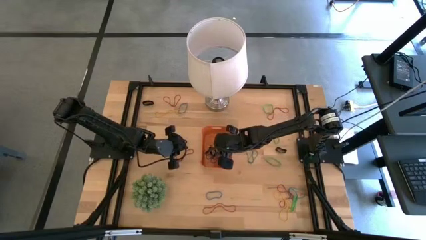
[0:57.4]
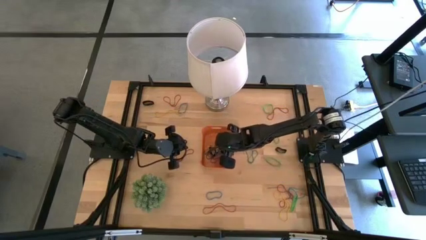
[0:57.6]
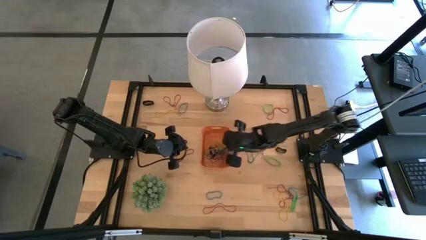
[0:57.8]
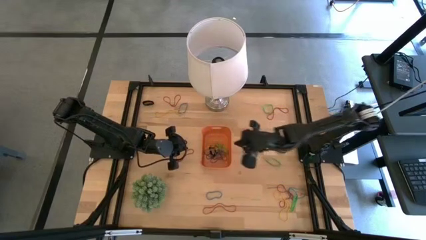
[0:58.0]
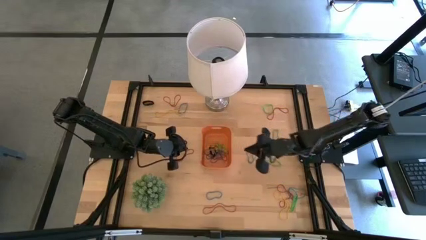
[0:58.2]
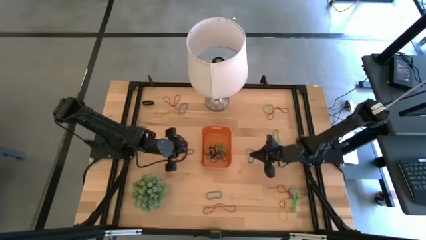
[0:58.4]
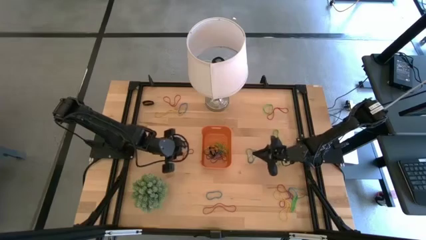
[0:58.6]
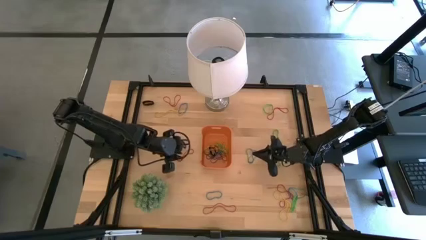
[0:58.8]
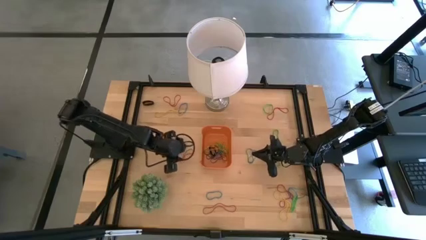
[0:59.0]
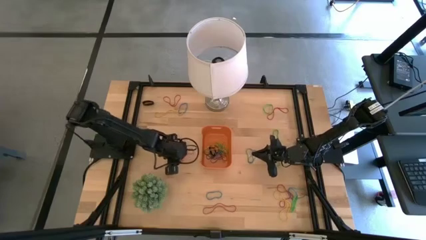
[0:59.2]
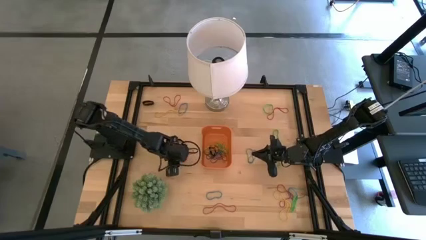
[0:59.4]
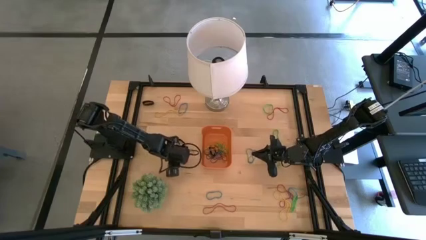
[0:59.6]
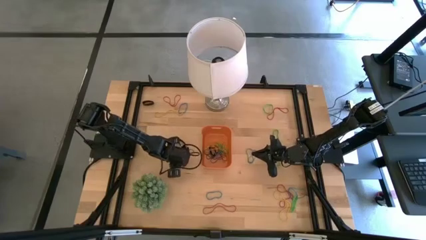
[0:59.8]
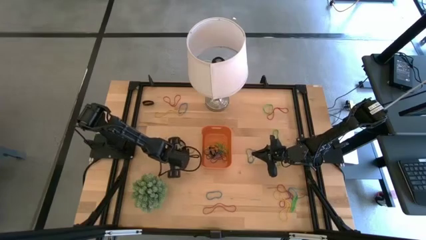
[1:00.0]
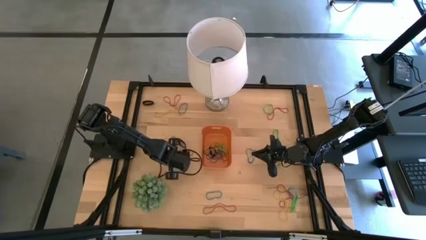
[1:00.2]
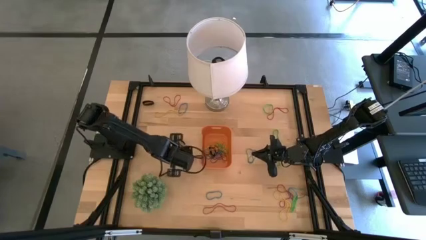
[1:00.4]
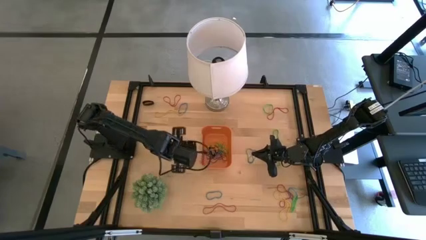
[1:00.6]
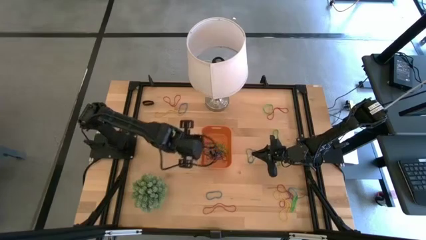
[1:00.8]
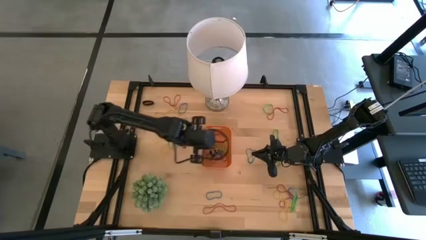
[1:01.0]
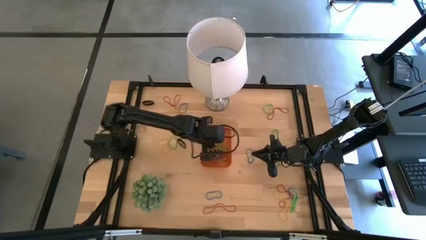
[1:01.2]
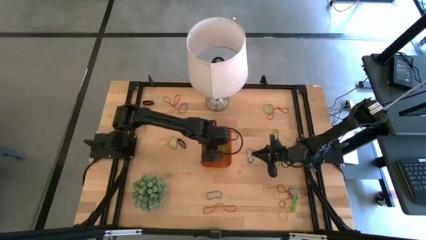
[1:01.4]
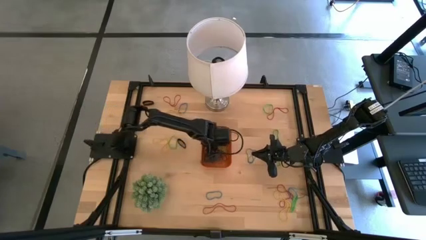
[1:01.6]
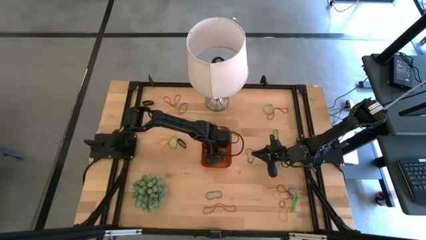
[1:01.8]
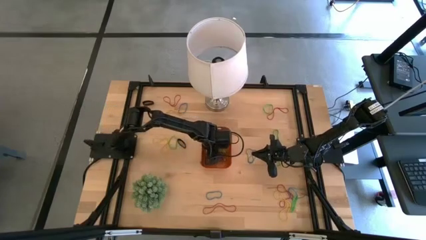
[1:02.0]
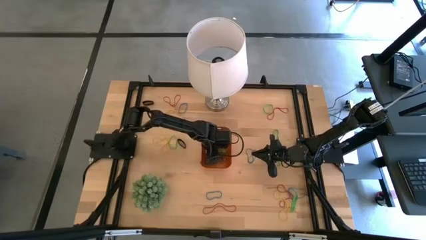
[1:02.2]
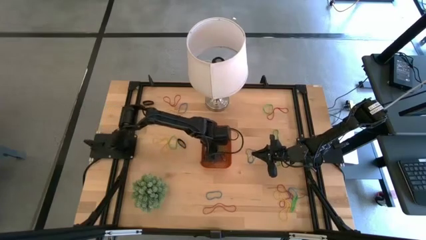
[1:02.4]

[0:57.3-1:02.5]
Task: Pick and place rubber bands into bin
Put the red rubber band into the orange bin

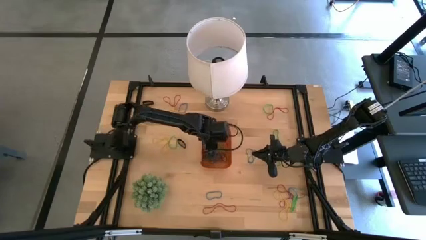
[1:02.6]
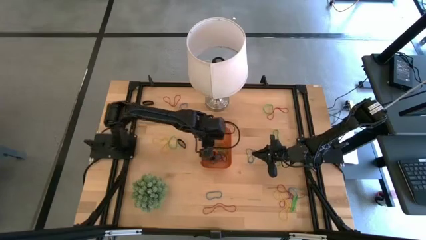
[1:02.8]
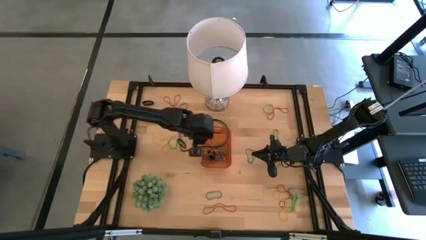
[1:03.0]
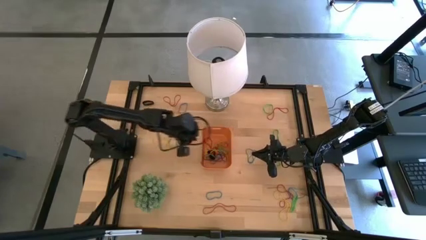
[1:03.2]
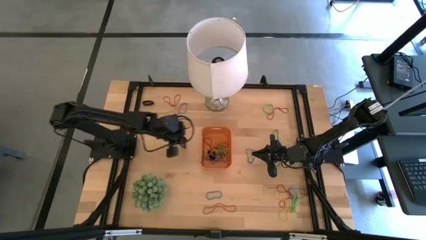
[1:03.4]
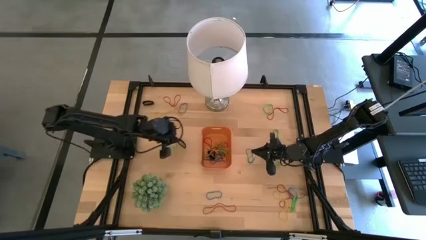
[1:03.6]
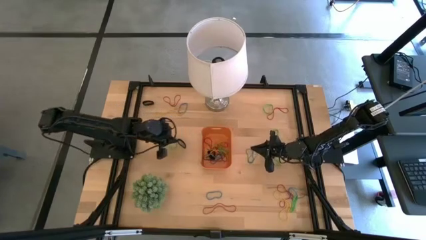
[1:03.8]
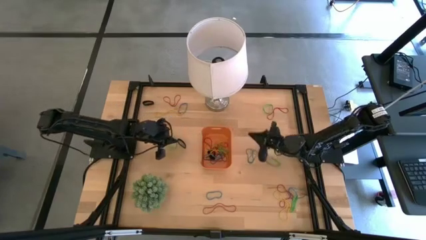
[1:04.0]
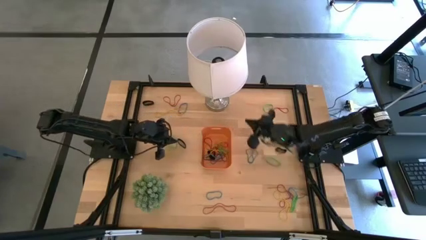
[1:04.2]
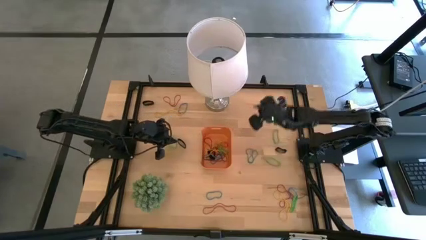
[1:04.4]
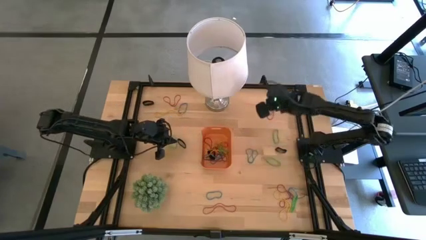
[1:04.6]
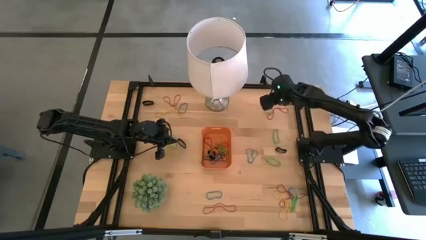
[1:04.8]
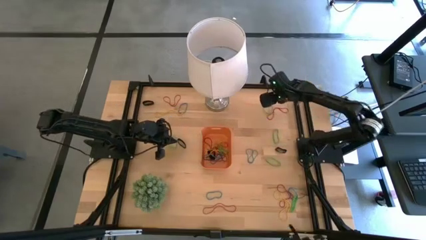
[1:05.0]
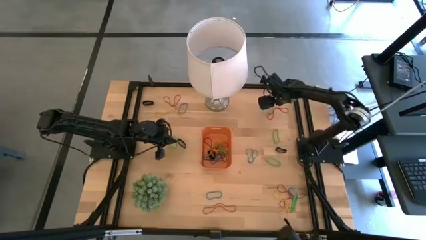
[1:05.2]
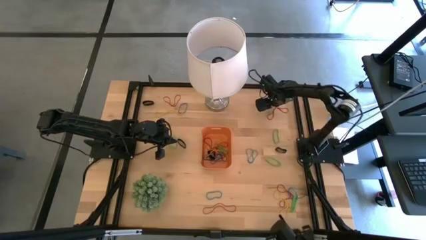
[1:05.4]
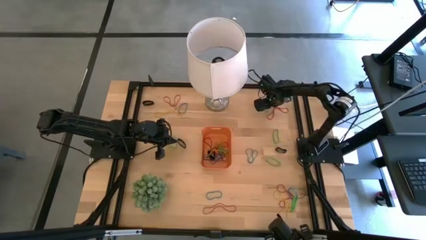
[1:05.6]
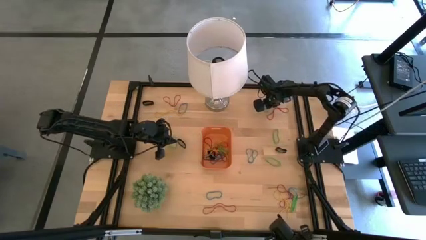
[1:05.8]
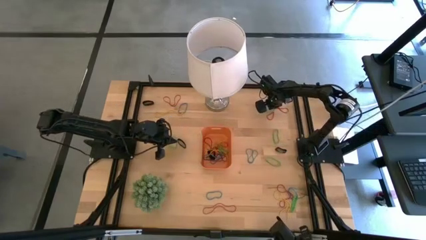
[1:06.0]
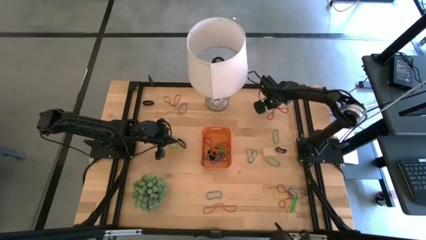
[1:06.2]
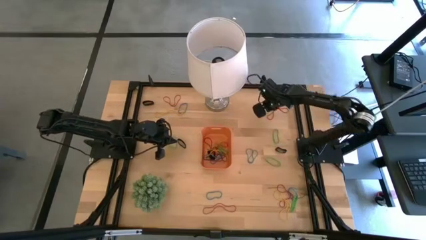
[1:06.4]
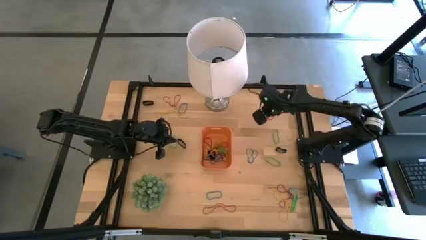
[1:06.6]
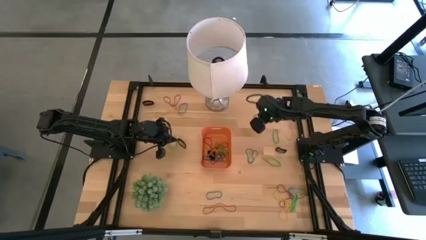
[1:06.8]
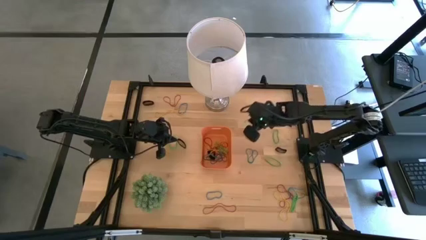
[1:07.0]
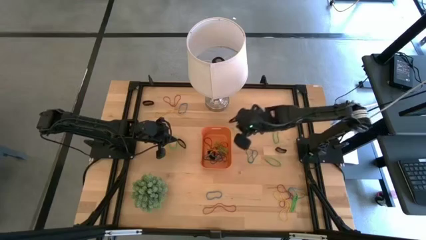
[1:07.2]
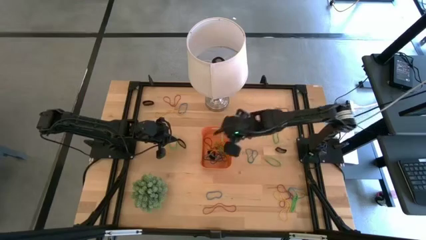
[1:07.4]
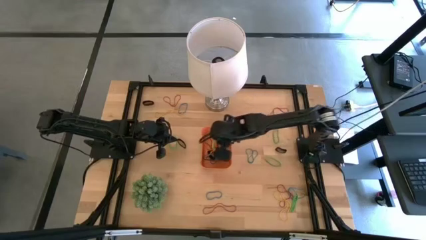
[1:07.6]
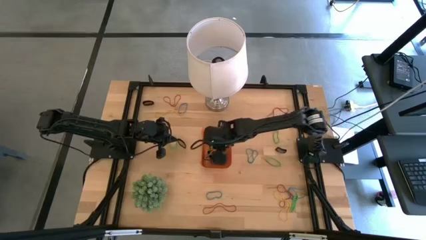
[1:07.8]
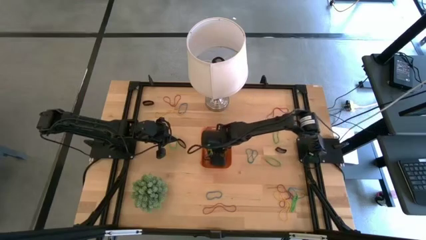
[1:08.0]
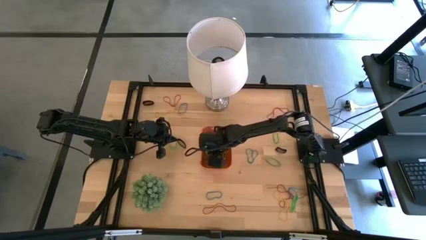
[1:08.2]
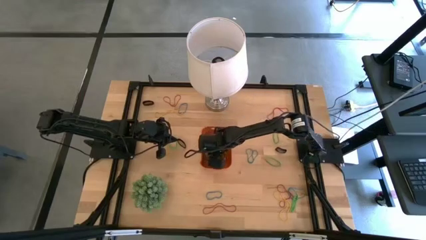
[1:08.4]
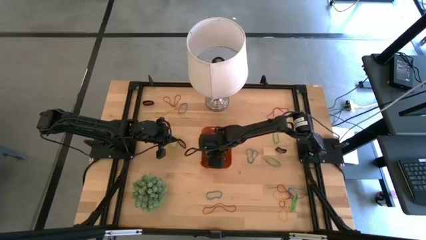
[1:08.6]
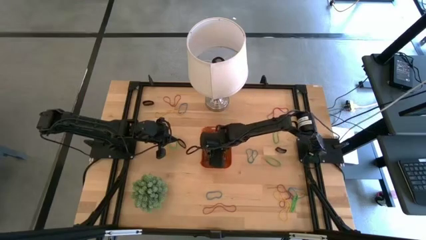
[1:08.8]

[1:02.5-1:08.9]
Put the green rubber band into the orange bin

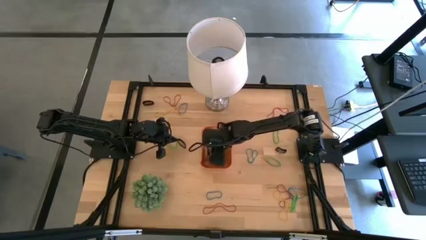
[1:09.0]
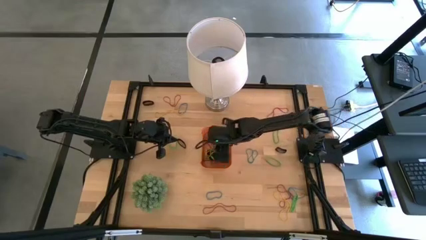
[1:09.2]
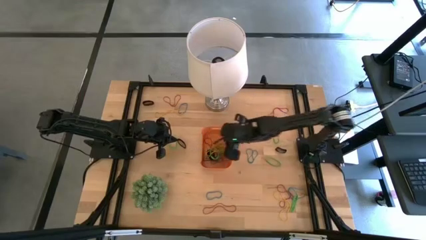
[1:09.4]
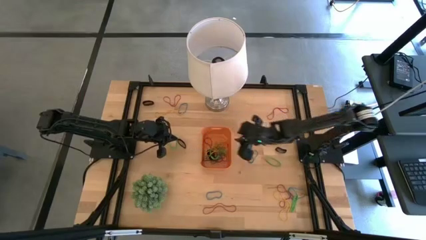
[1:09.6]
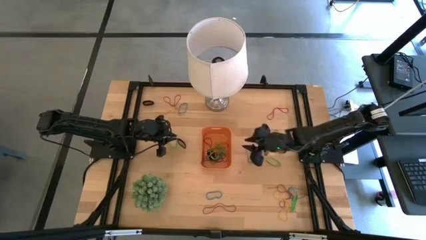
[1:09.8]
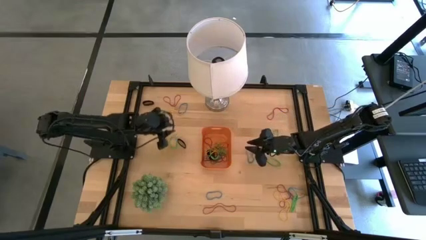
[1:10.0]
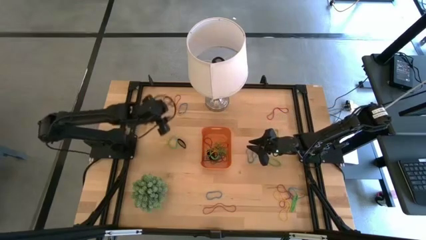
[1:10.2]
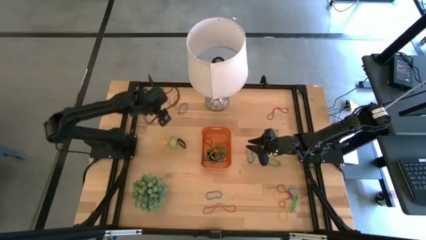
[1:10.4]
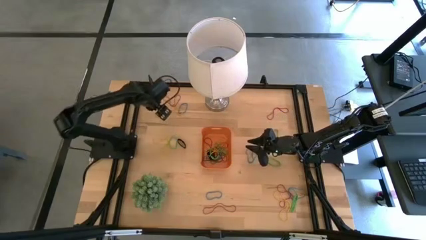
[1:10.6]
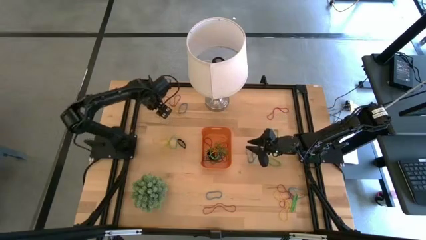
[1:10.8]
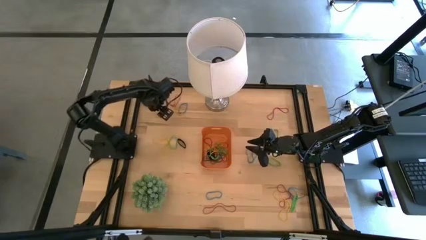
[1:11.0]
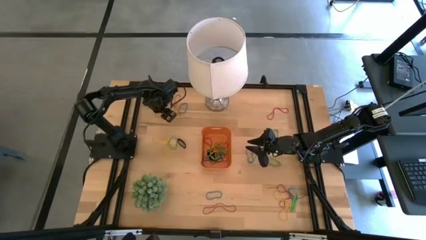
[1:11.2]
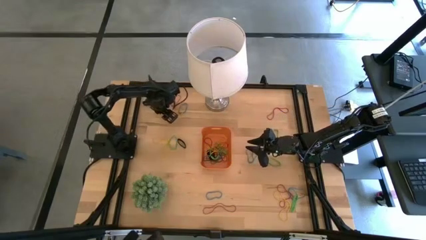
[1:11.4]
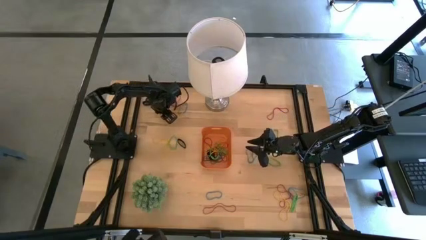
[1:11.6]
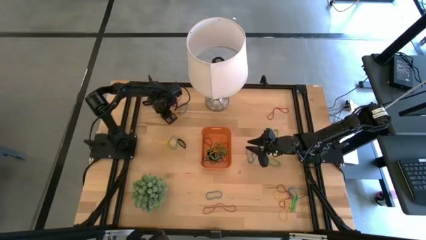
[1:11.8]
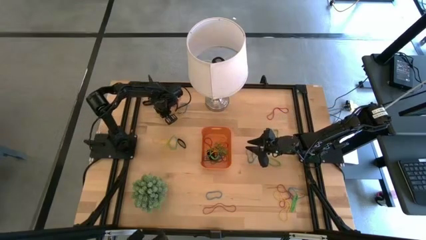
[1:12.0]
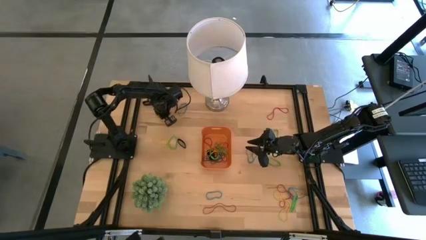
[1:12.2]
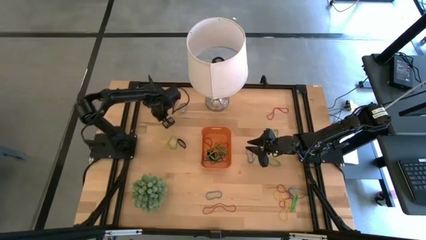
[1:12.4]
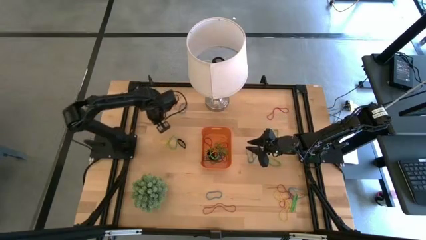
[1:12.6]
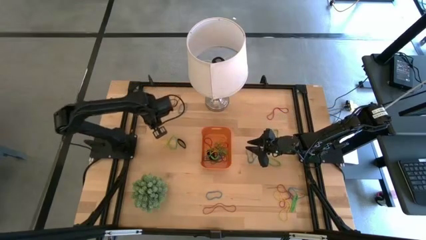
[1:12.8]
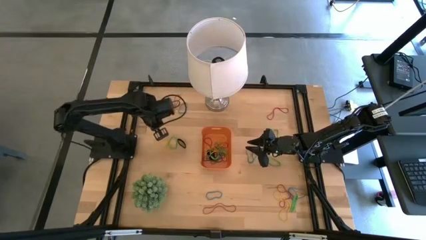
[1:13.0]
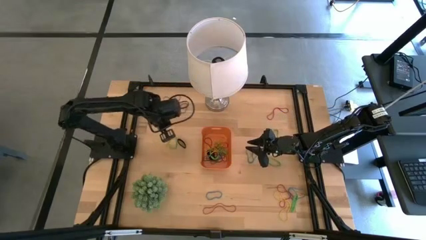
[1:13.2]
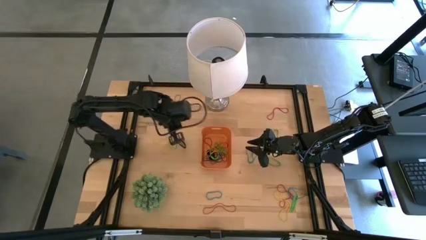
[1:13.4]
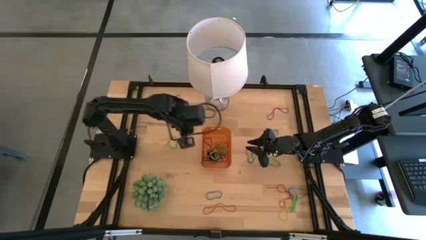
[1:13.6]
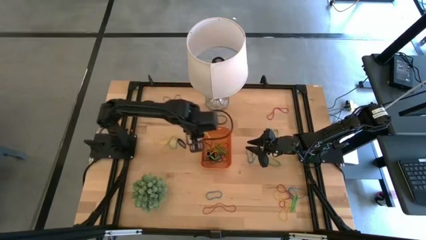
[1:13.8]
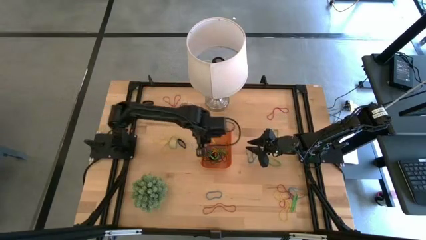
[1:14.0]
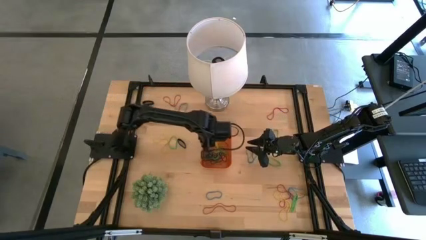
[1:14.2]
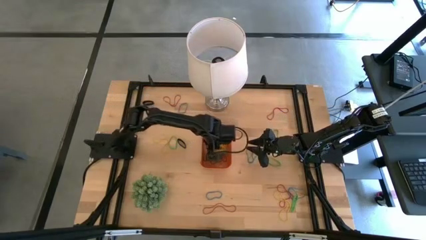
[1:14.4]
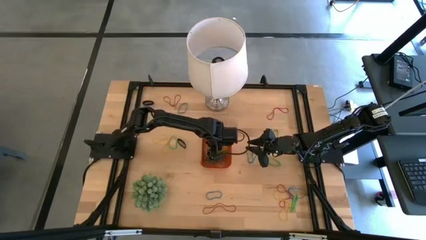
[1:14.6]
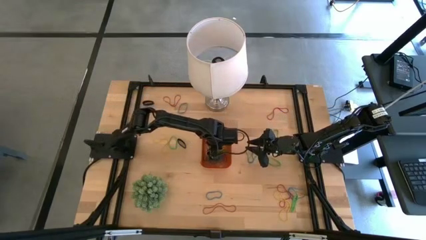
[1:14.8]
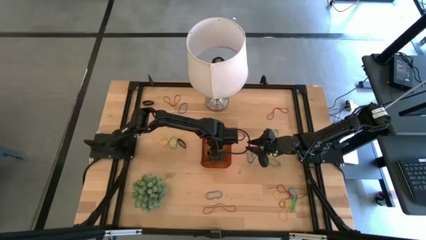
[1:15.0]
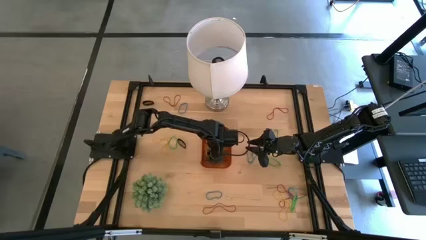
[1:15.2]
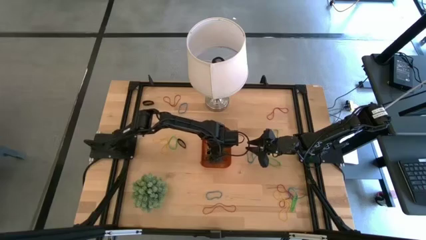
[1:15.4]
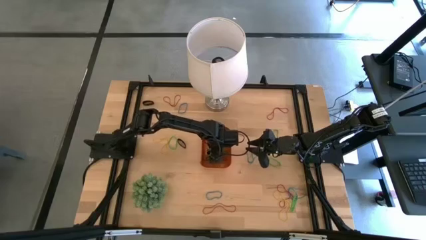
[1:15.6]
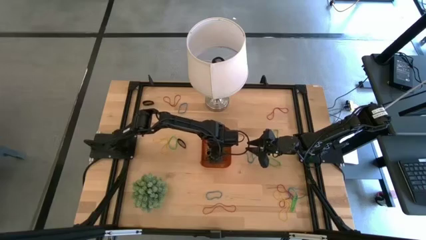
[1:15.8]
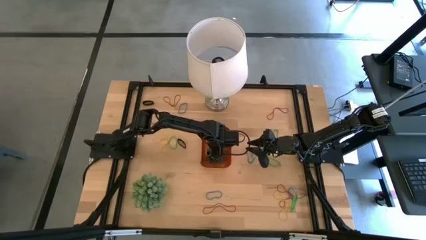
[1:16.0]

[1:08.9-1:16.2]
Put the yellow rubber band into the orange bin
